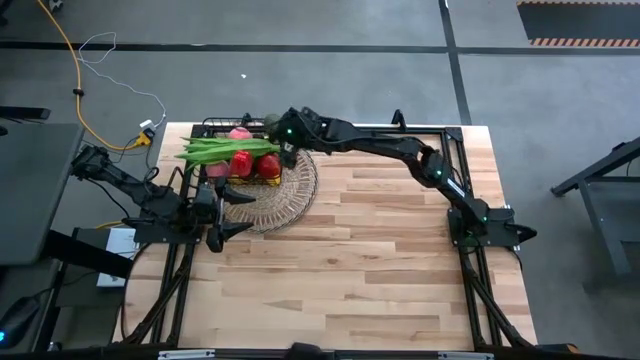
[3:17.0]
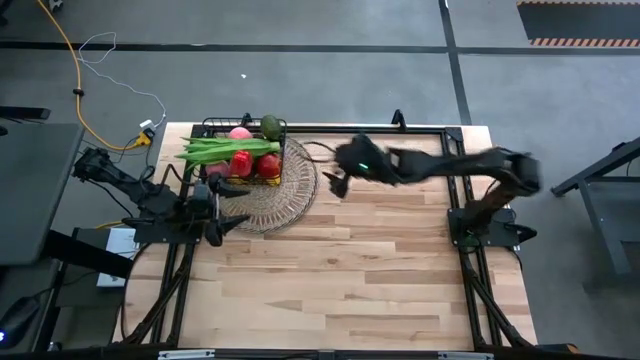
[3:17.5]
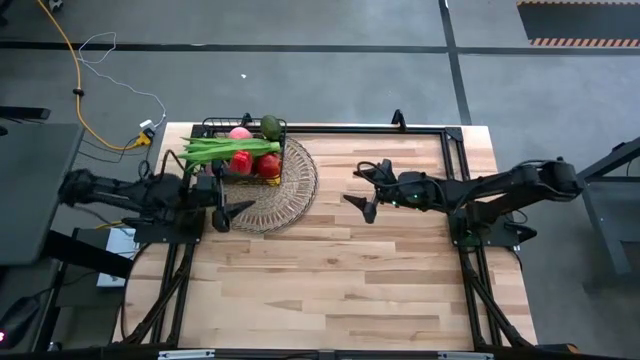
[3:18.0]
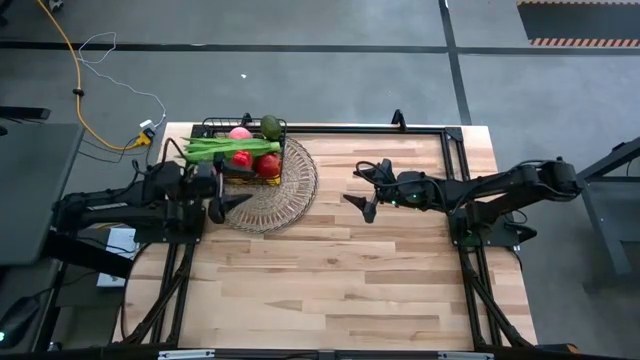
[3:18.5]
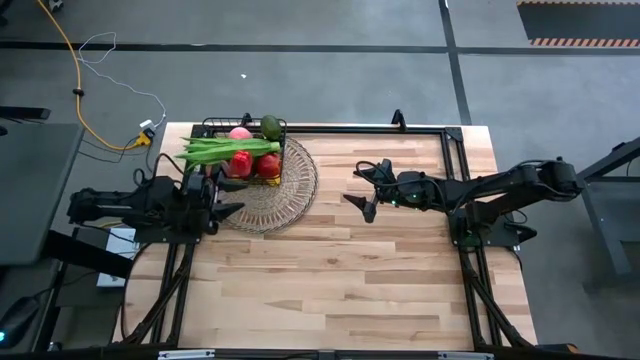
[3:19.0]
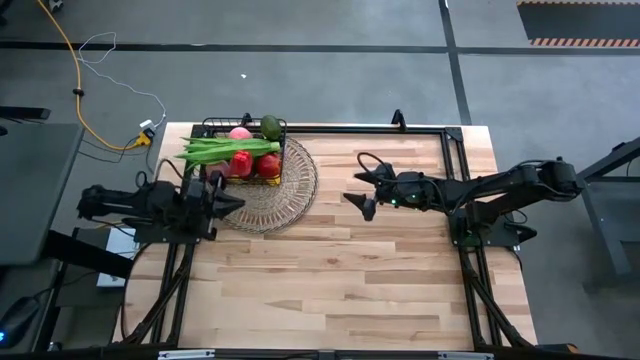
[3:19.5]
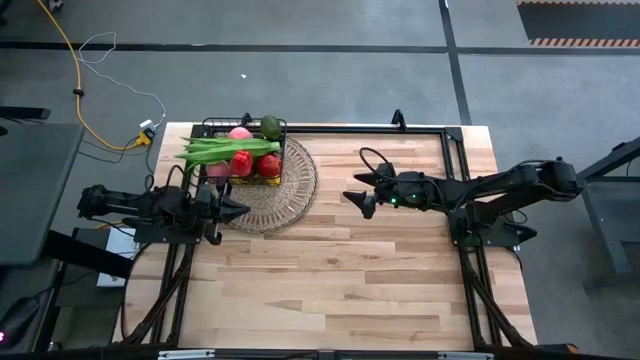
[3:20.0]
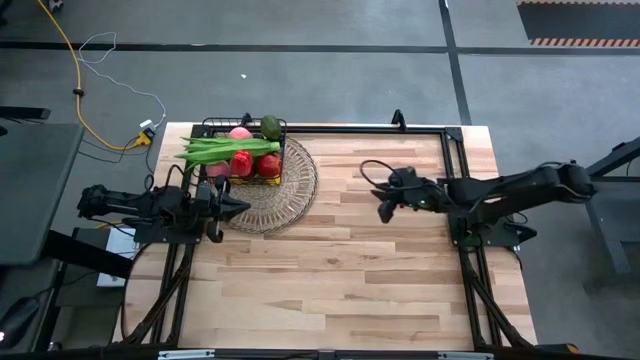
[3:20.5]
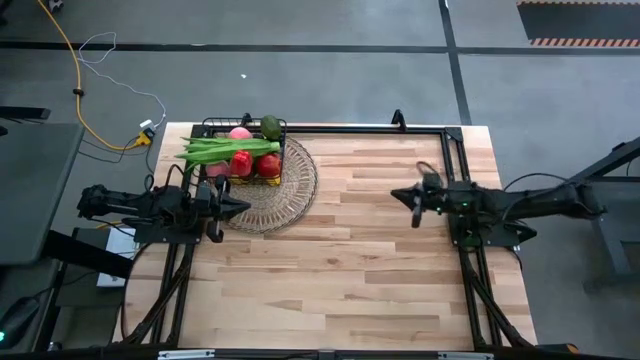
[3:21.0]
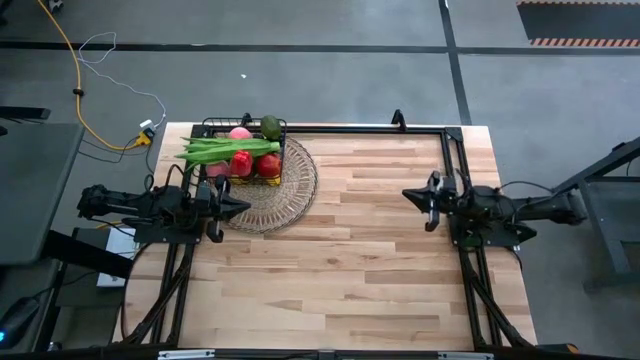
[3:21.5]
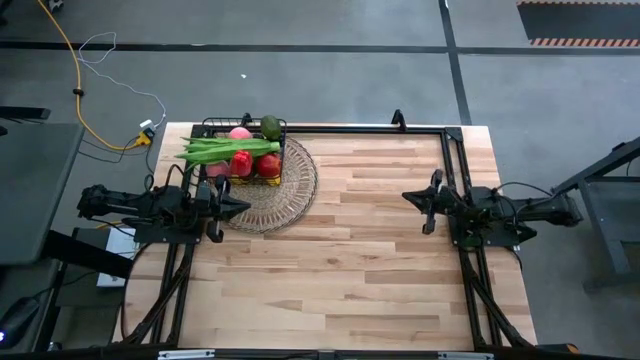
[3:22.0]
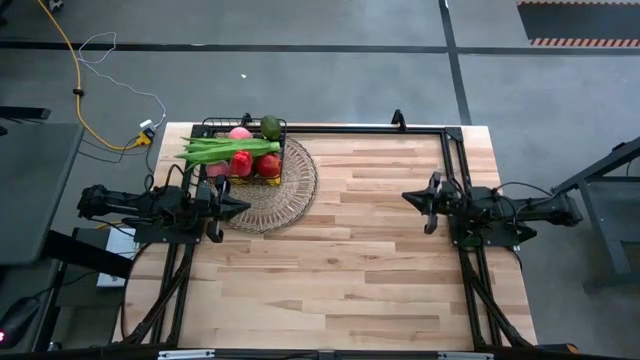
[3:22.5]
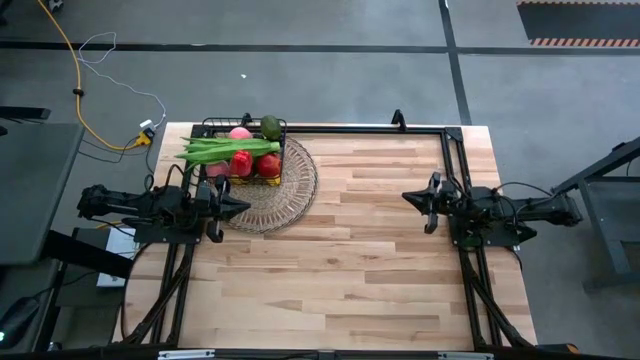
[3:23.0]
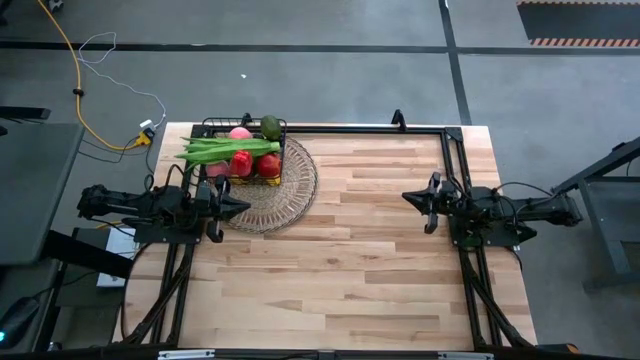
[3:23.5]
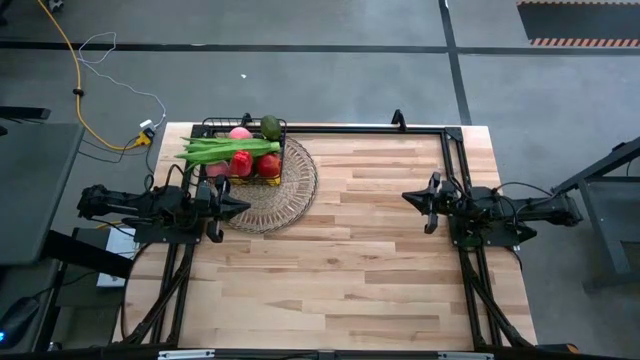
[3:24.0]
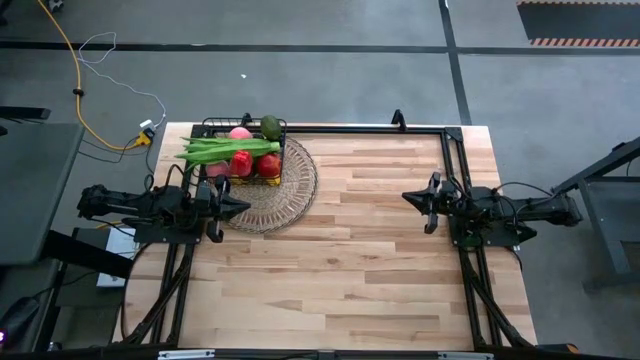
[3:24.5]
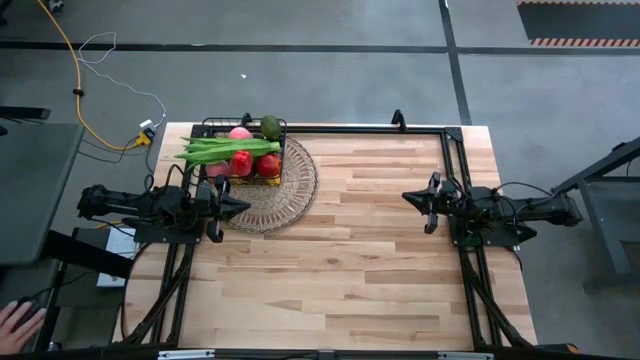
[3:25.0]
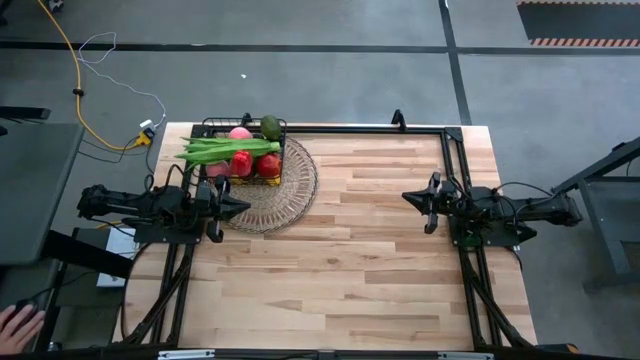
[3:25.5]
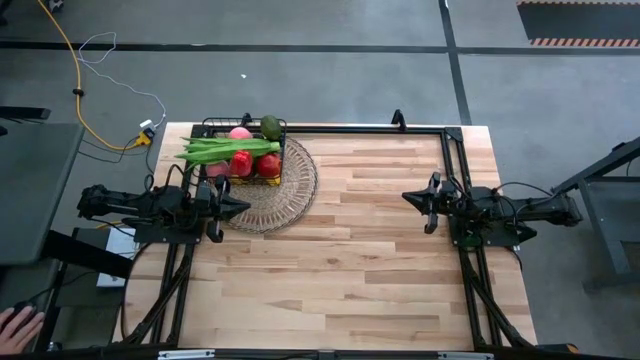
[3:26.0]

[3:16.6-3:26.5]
Task: Build produce basket
Return to Home Position

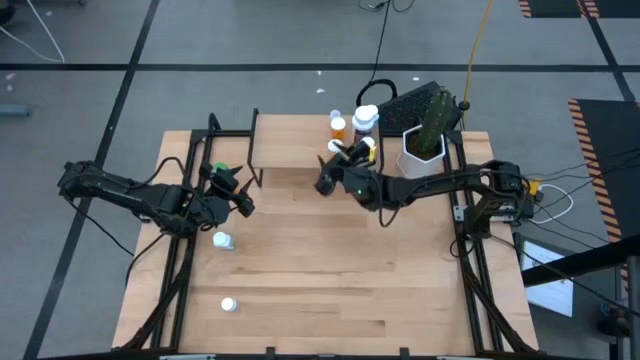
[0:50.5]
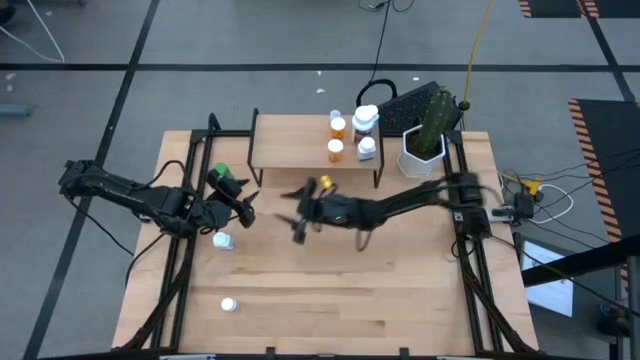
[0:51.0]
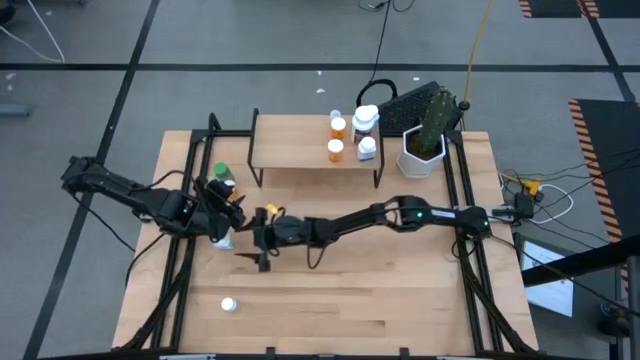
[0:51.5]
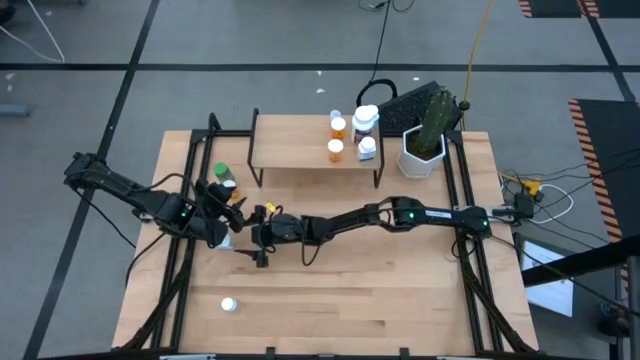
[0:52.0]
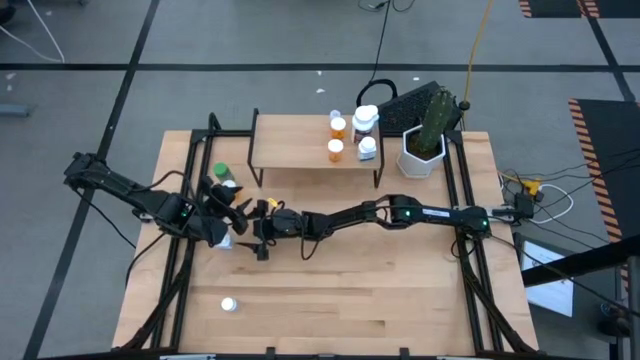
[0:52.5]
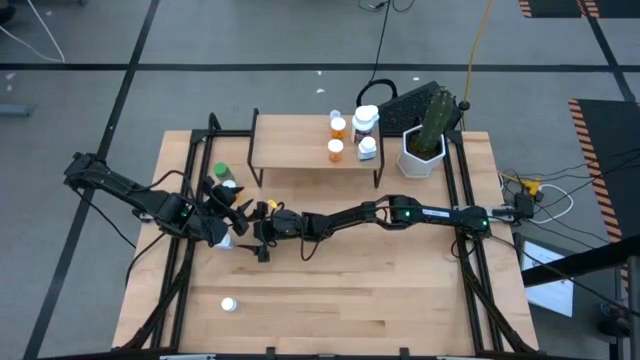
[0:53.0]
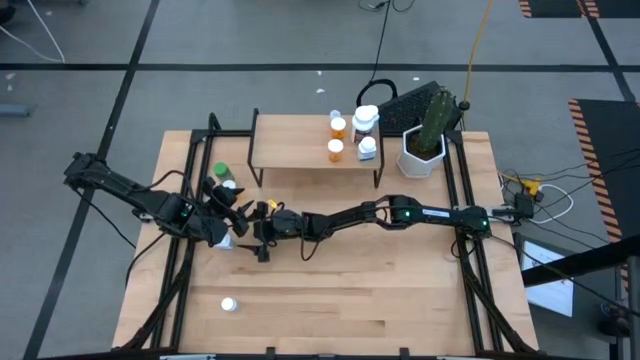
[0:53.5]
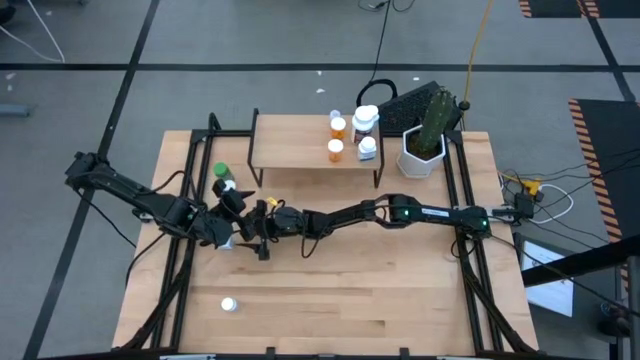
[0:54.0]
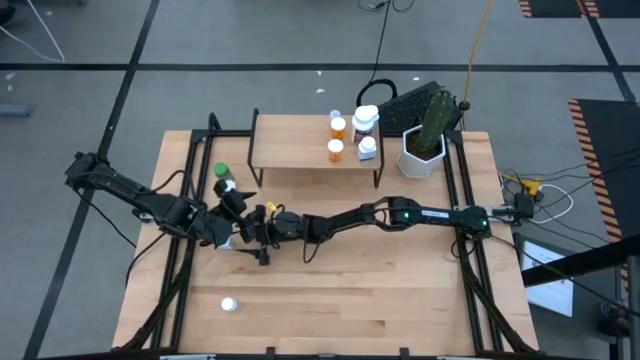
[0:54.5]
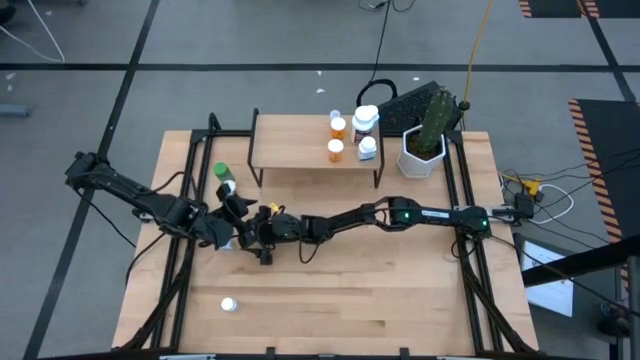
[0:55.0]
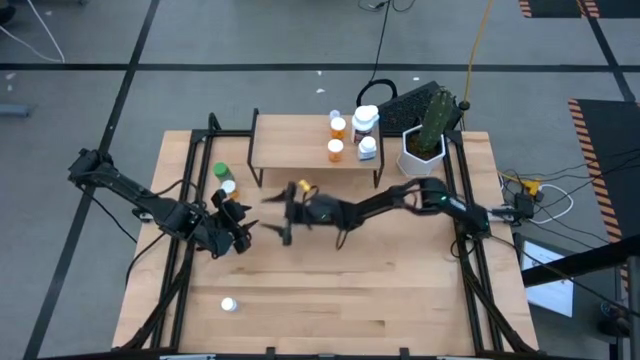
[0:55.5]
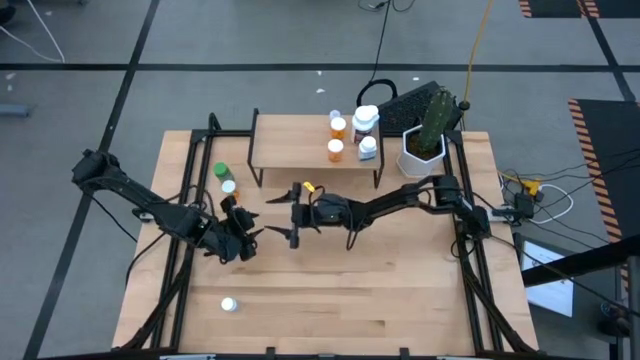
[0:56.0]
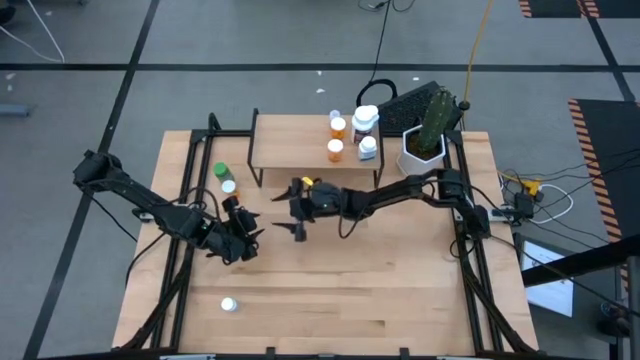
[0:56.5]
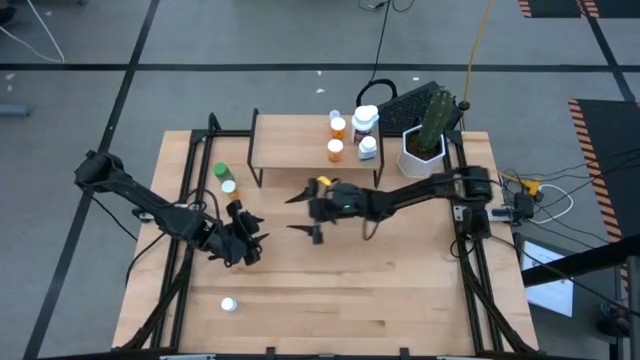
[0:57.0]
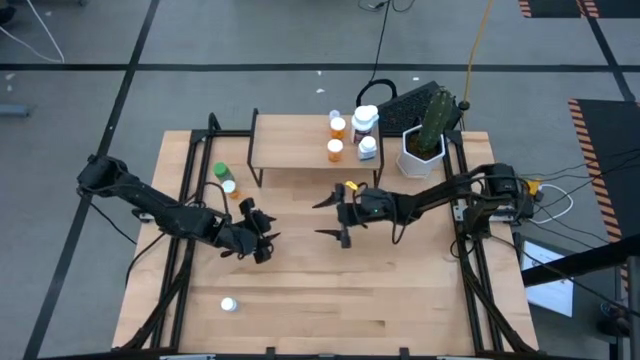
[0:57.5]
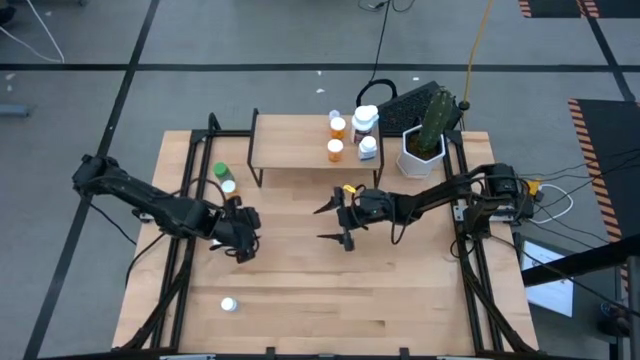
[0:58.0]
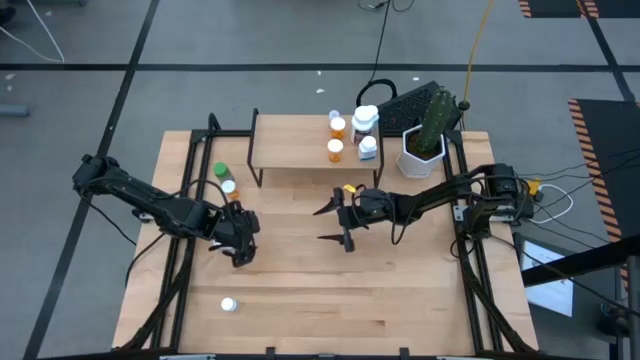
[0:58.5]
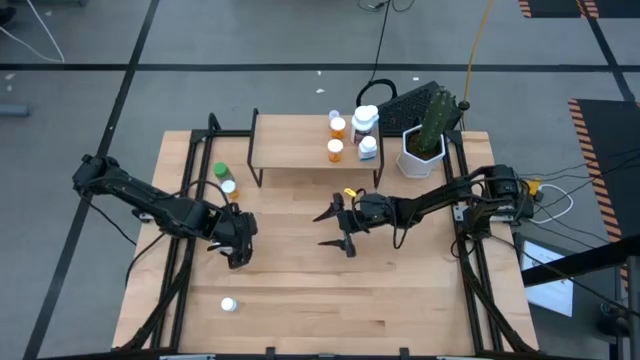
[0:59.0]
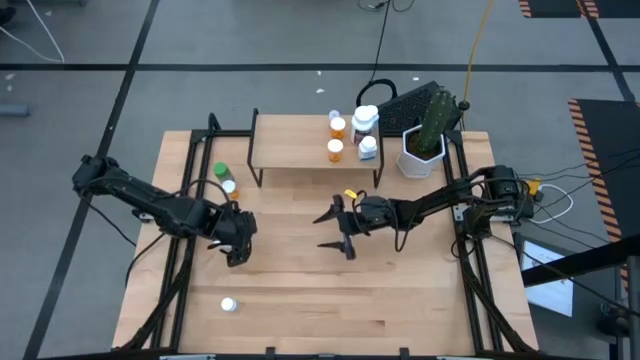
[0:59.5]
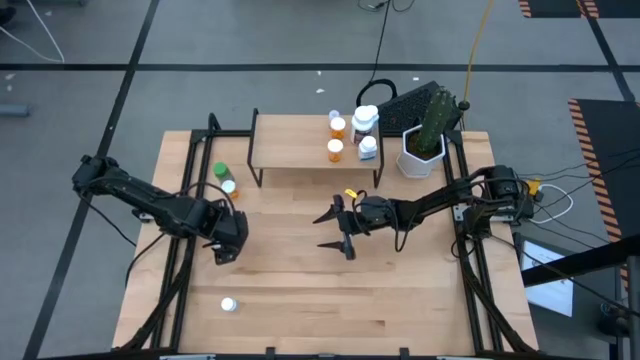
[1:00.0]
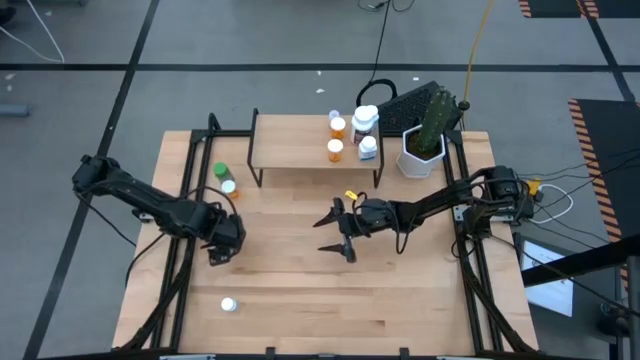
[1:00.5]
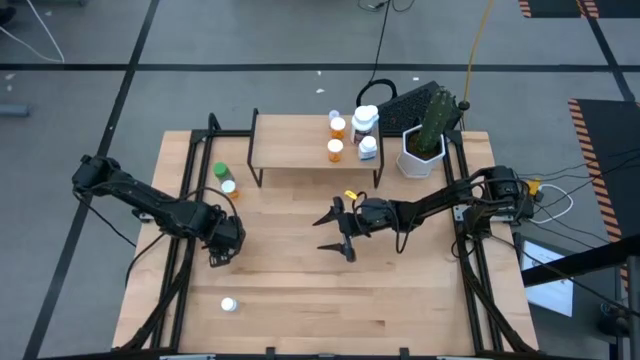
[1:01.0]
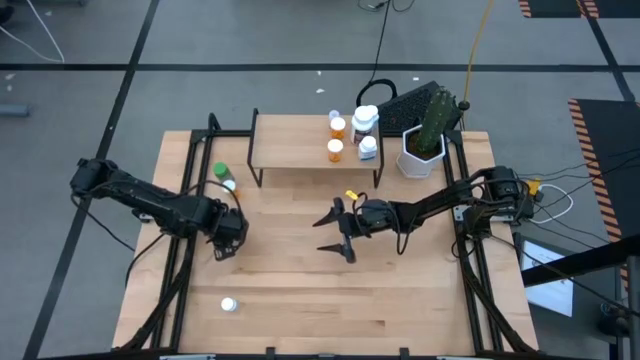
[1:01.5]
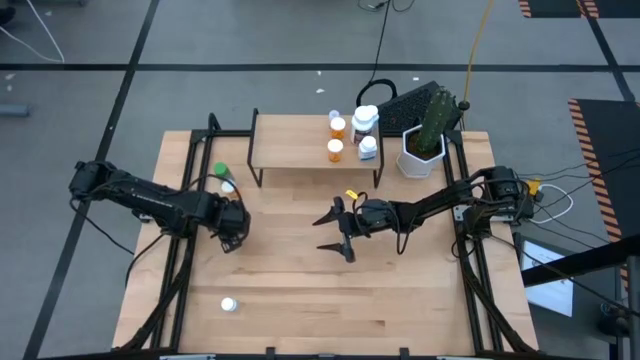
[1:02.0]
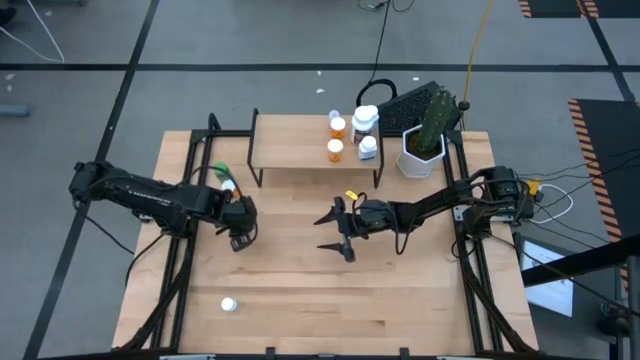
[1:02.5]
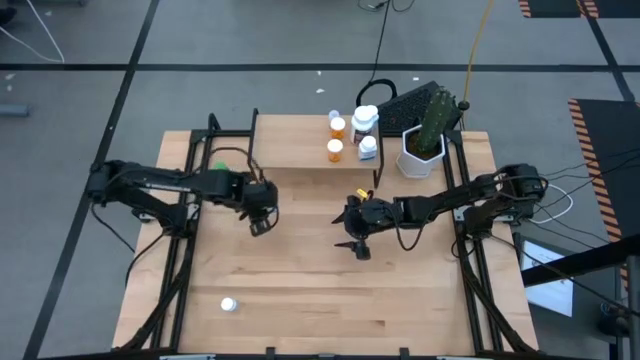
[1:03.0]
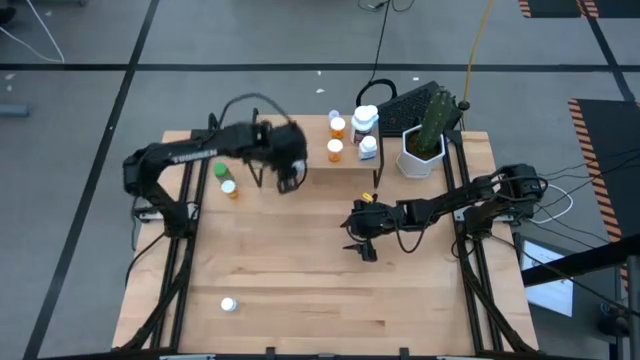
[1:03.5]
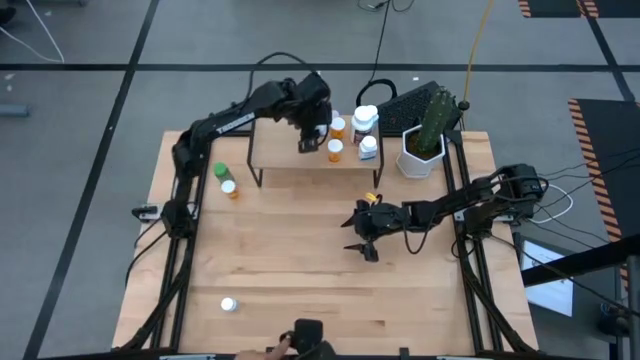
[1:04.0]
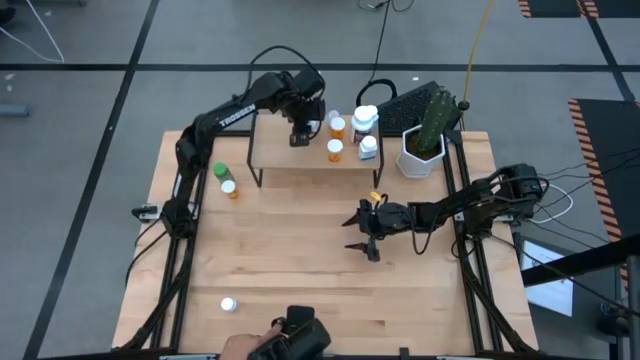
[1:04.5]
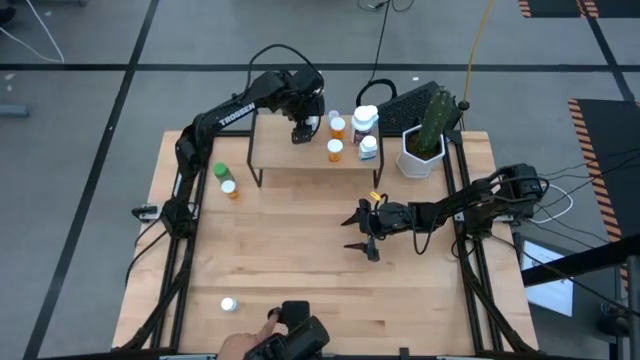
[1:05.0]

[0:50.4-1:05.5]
Task: Pick and place medicine bottles onto shelf by color
Put the white and blue medicine bottle on the shelf
